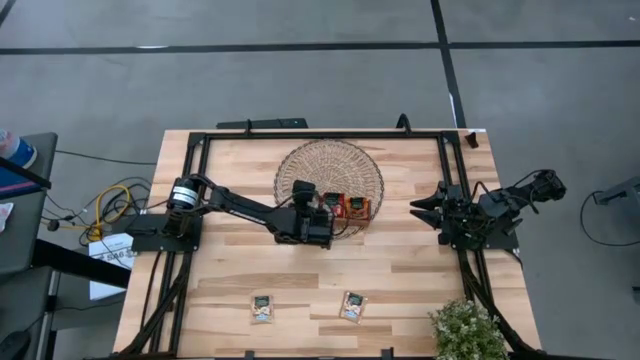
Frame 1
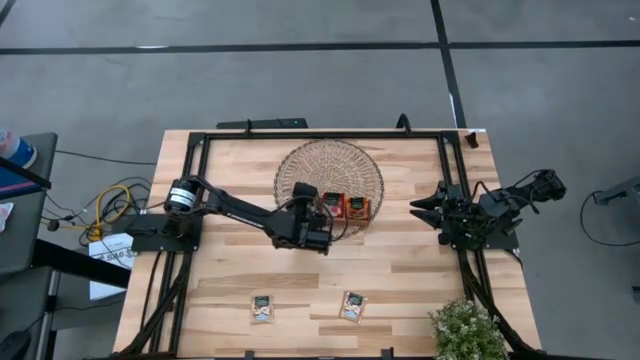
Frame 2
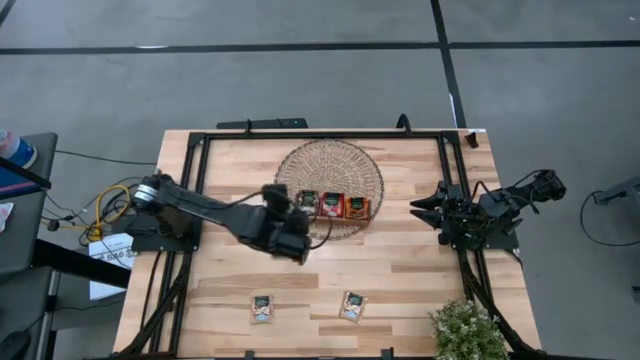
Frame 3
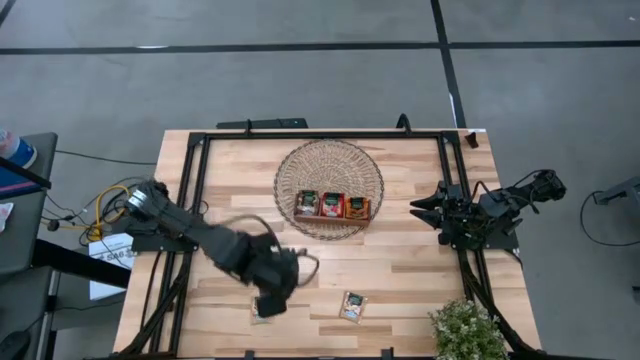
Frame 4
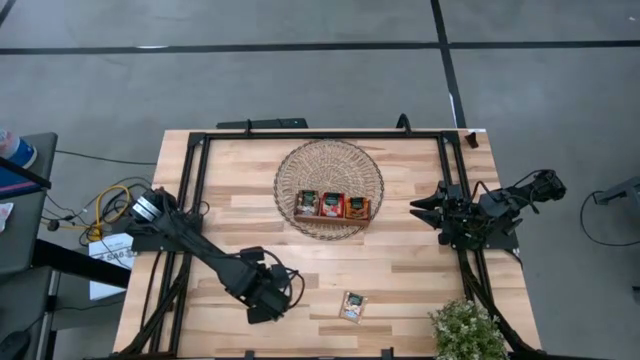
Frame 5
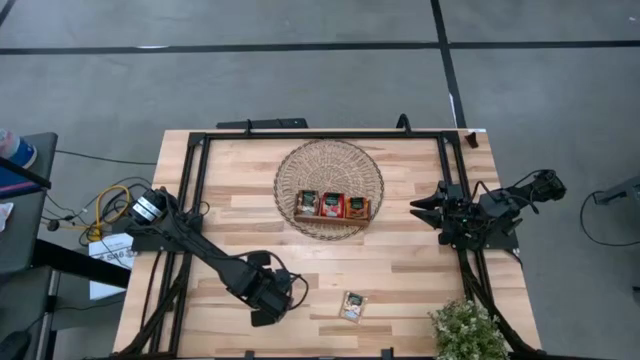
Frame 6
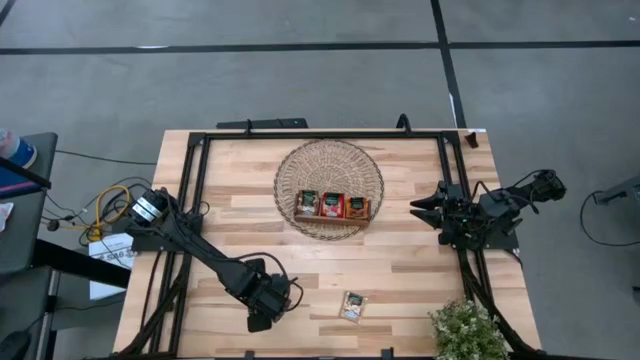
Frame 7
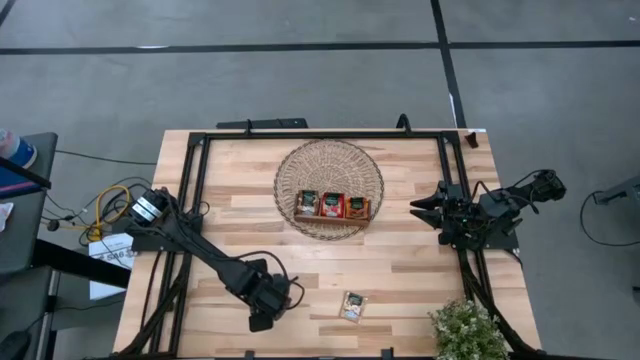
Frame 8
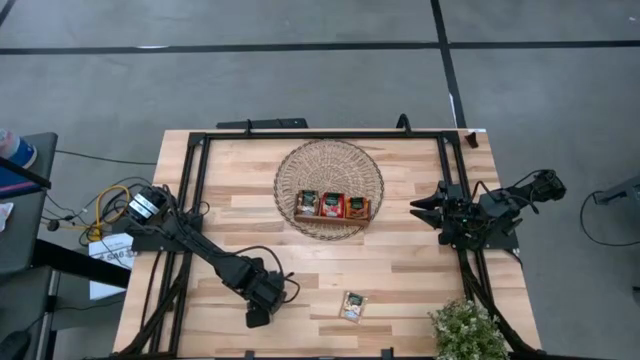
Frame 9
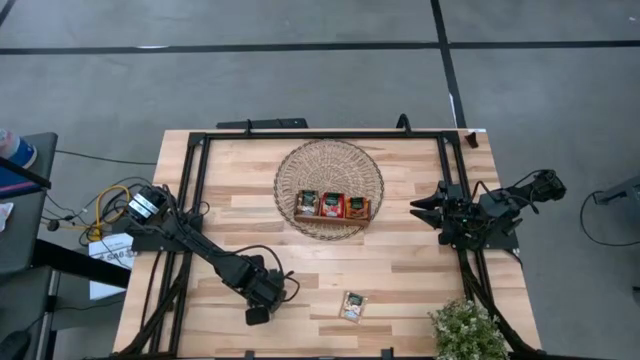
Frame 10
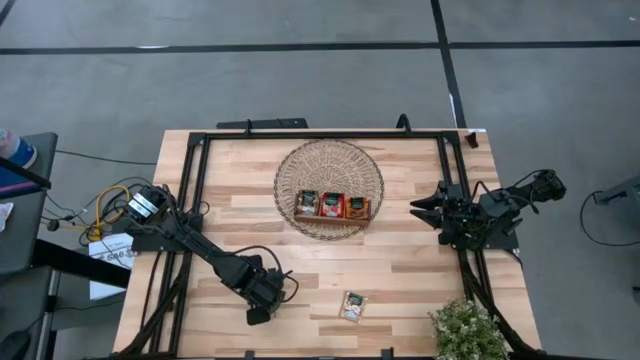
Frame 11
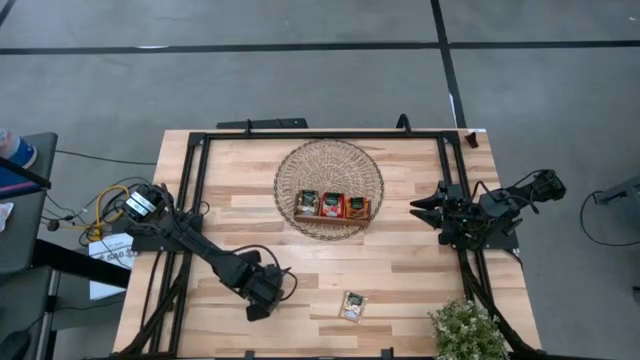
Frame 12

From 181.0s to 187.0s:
Task: Pick & Place Tea
Put the brown tea bag into the left section of the wooden organizer

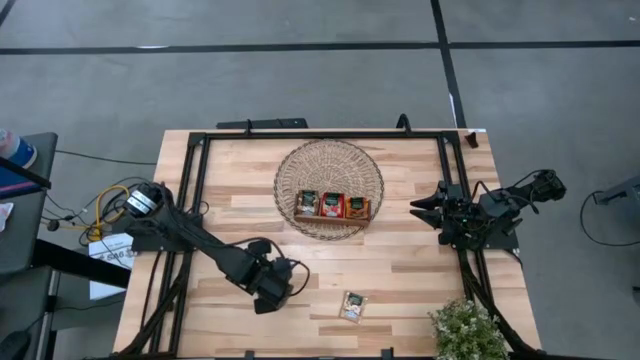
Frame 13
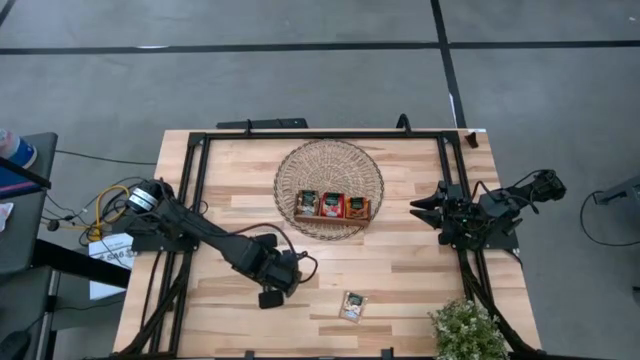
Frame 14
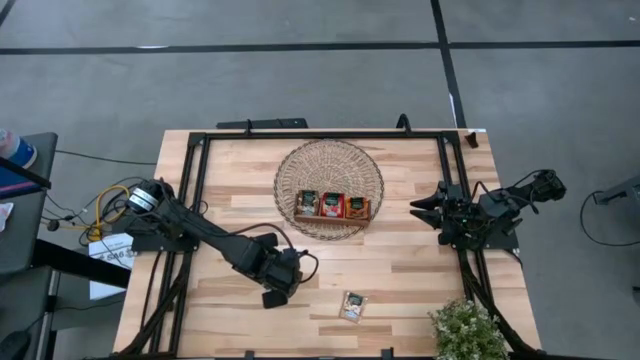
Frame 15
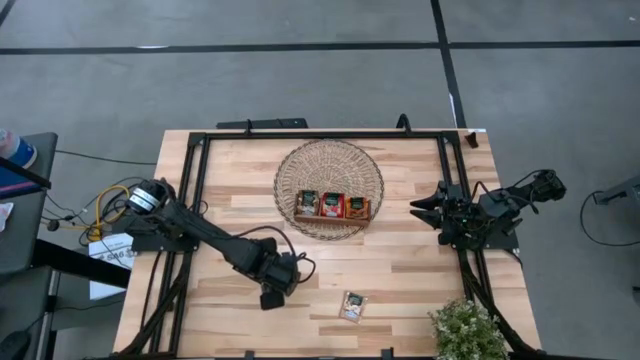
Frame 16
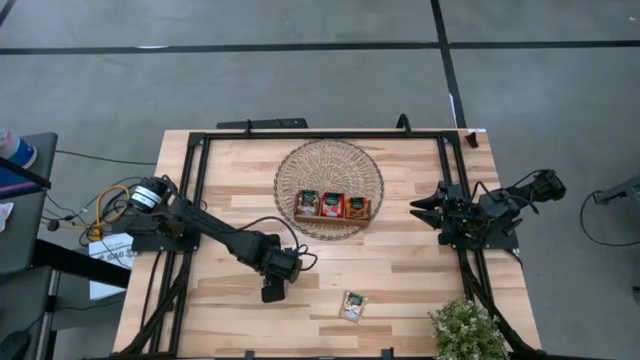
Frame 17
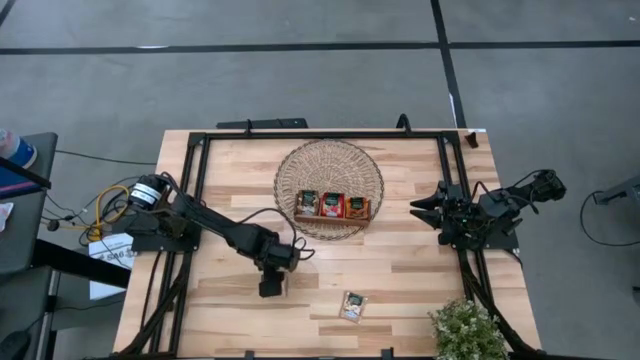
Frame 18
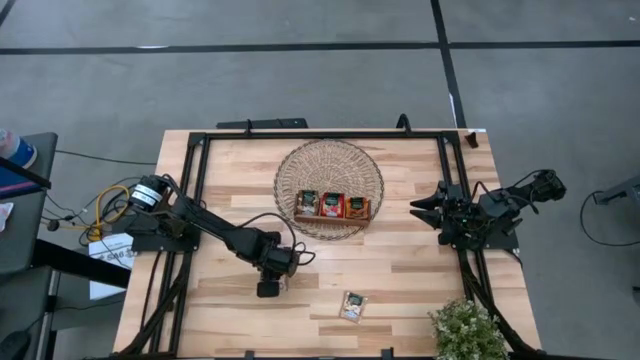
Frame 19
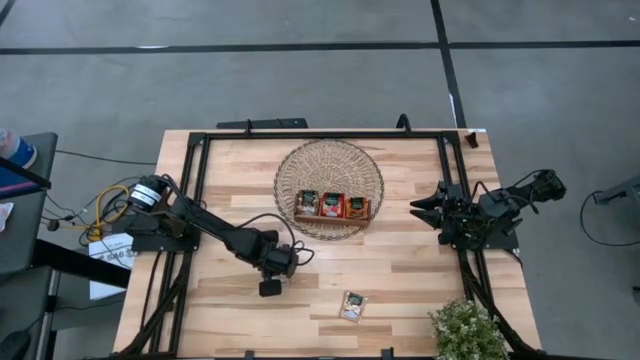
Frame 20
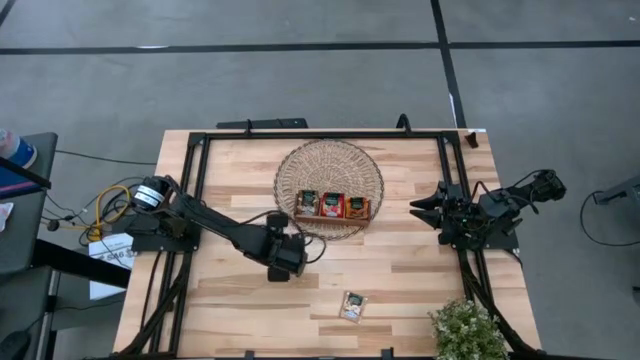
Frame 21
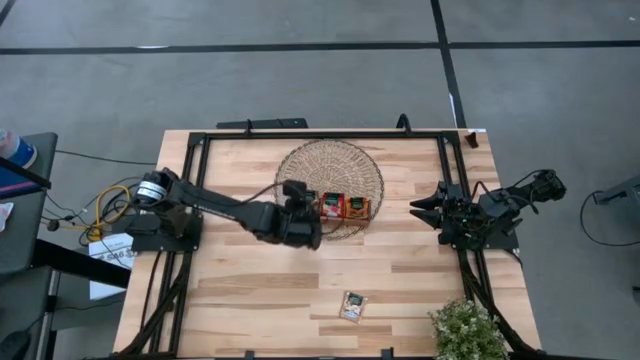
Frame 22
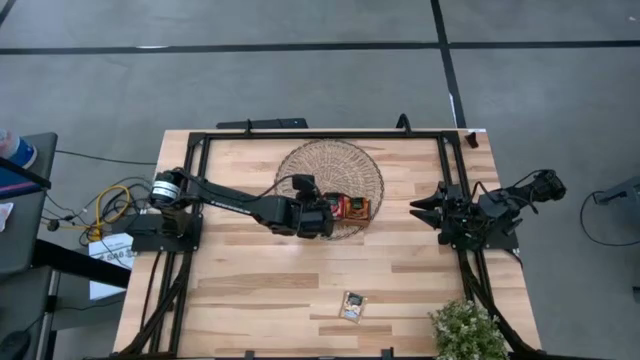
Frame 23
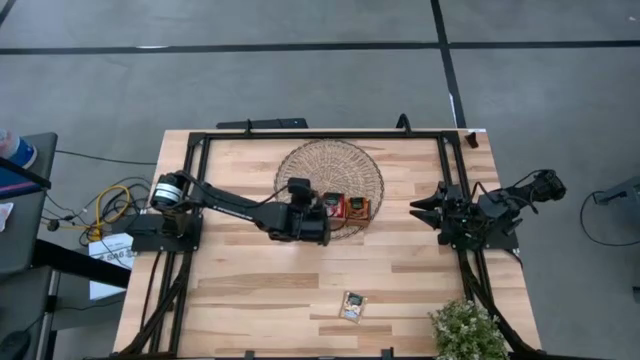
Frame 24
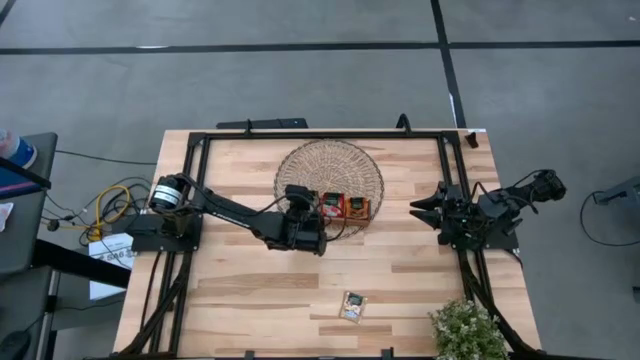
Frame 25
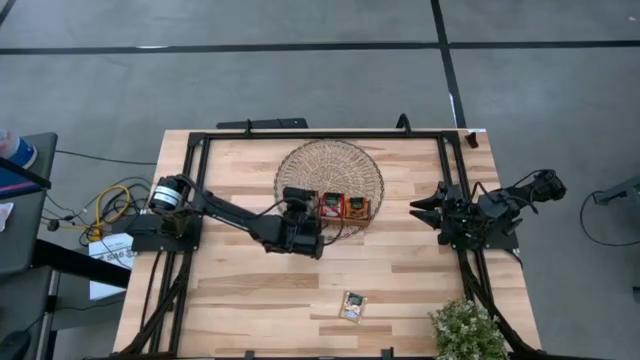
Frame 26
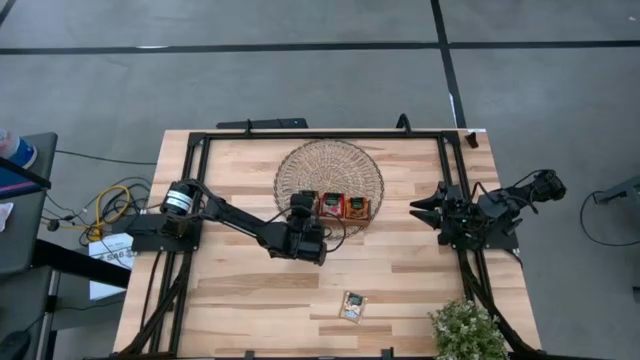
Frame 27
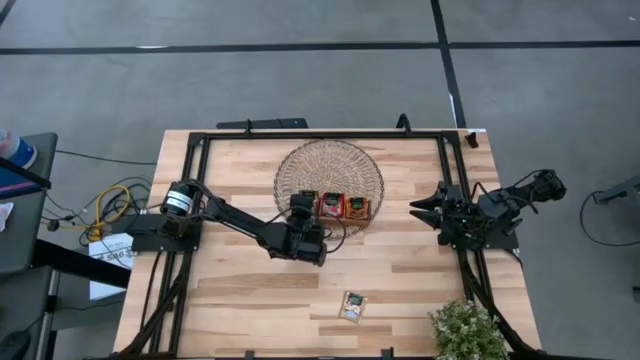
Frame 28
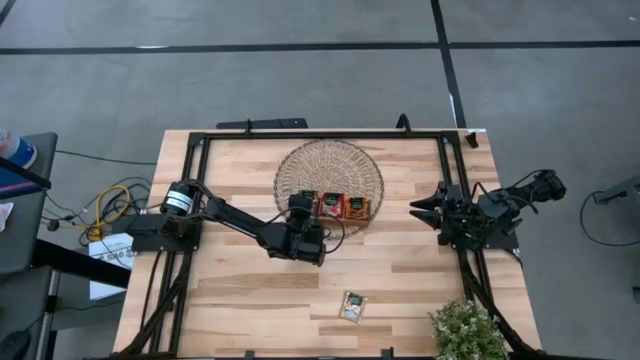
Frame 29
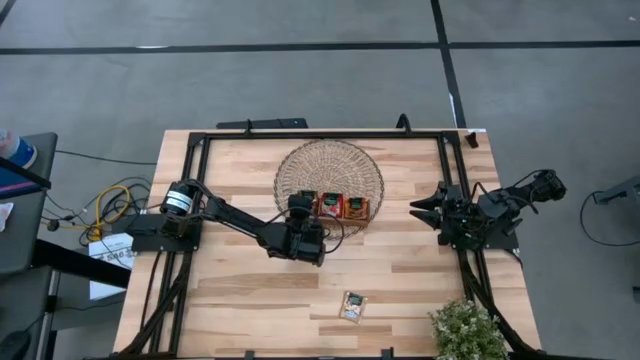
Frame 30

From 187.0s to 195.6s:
Put the brown tea bag into the left section of the wooden organizer

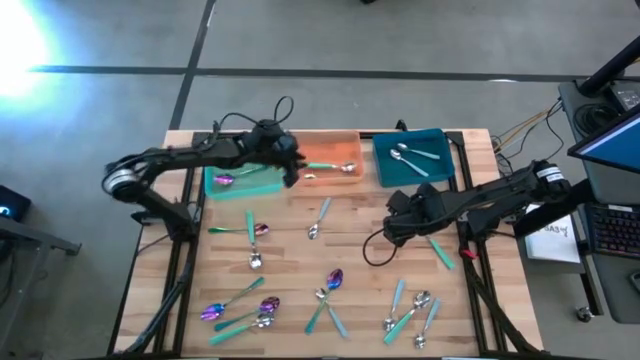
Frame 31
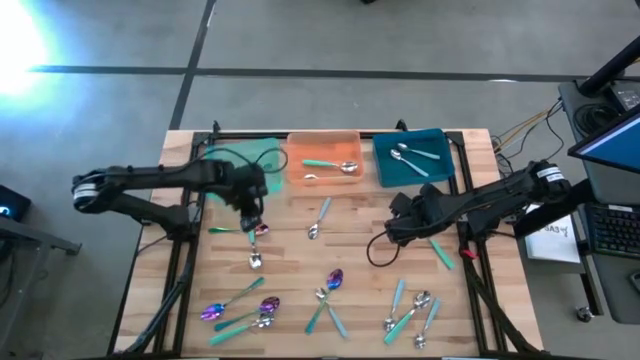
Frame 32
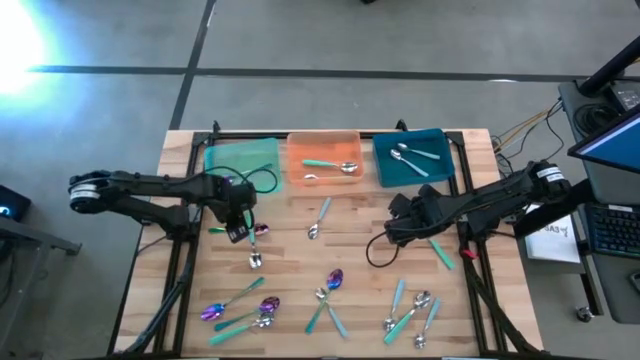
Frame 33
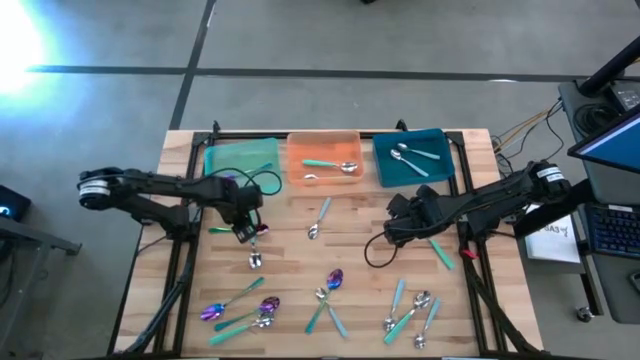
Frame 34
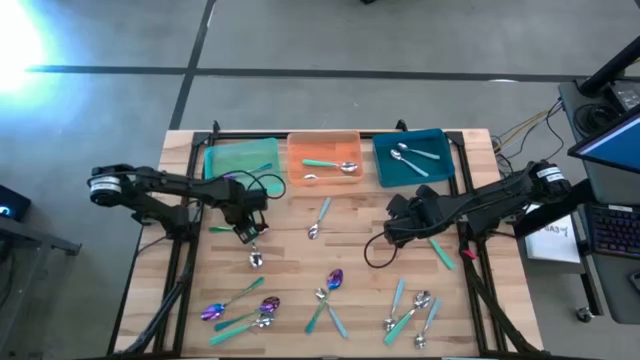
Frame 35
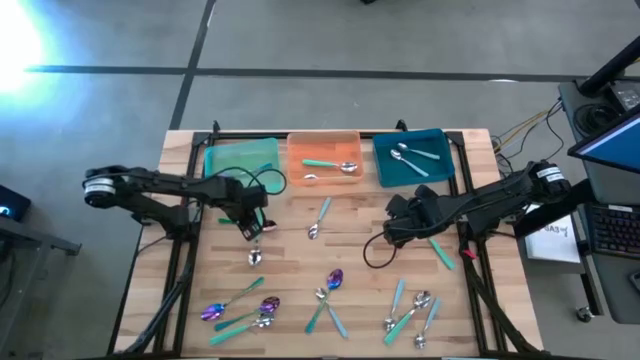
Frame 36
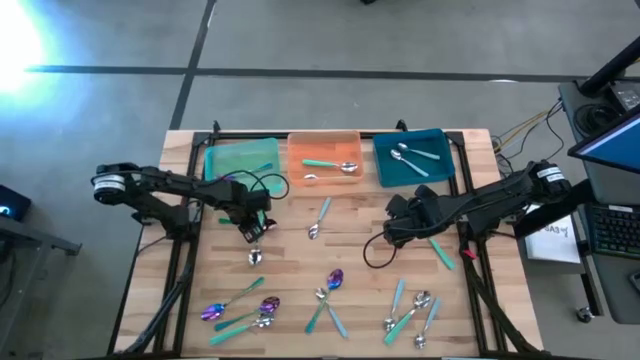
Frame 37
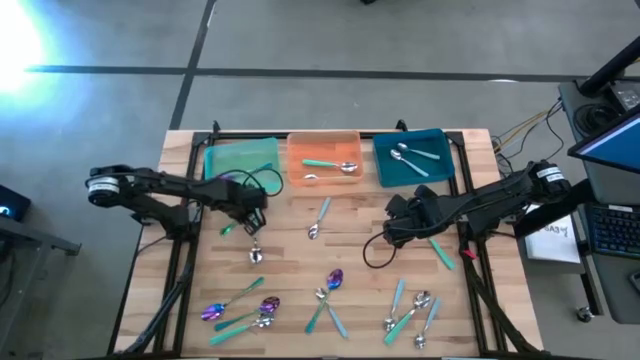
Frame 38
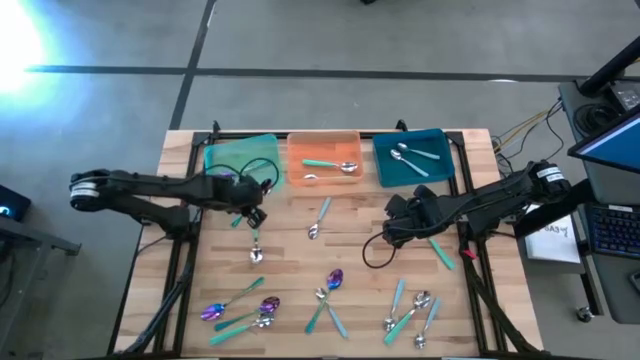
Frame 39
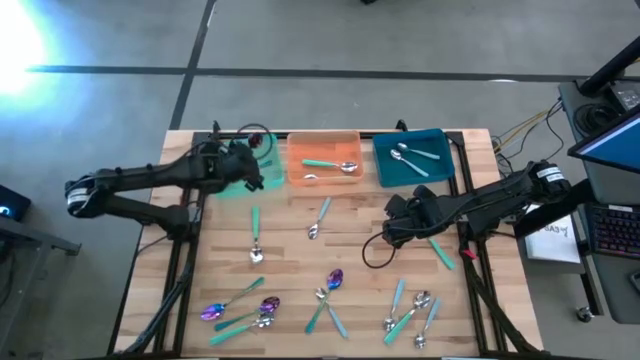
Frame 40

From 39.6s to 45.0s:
Task: Sort silverware by color (type)
Put the blue spoon into the green bin
